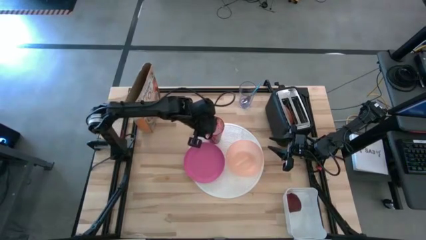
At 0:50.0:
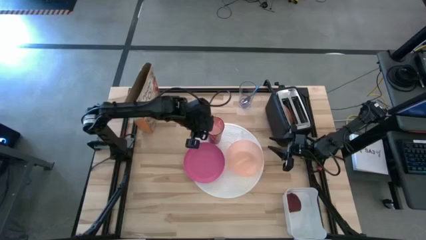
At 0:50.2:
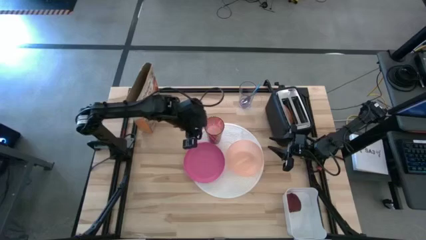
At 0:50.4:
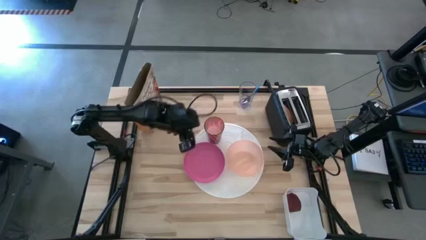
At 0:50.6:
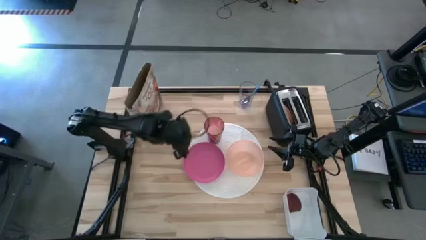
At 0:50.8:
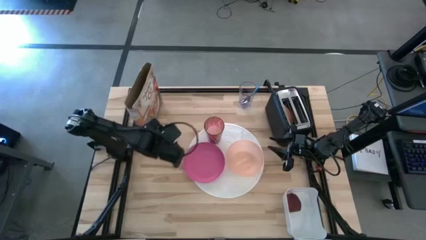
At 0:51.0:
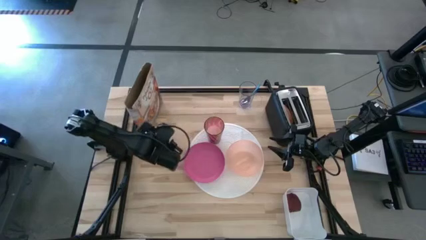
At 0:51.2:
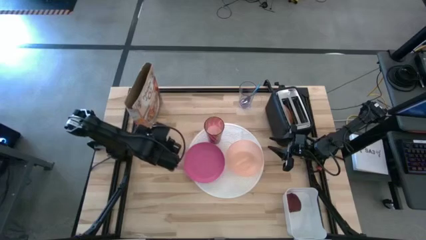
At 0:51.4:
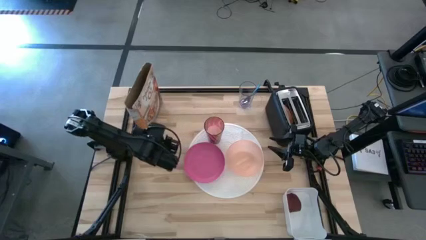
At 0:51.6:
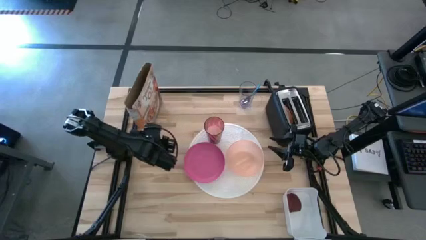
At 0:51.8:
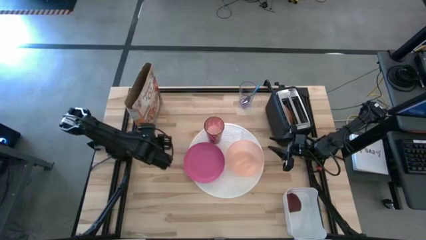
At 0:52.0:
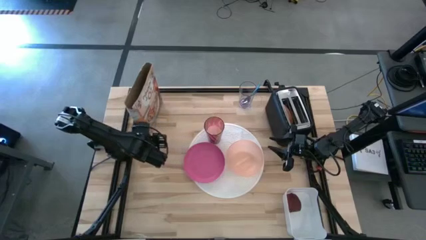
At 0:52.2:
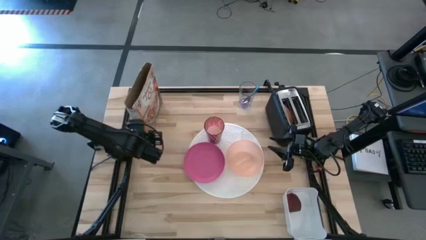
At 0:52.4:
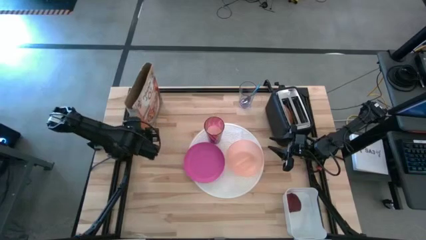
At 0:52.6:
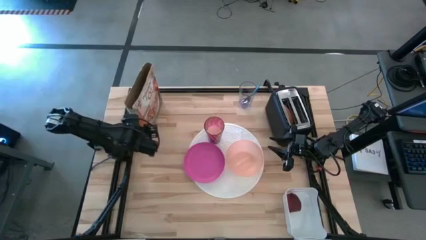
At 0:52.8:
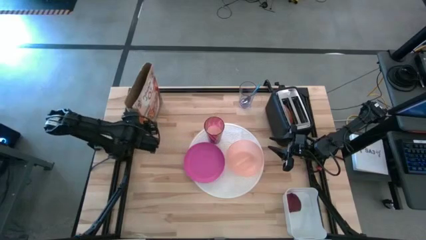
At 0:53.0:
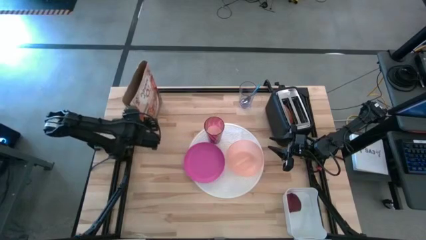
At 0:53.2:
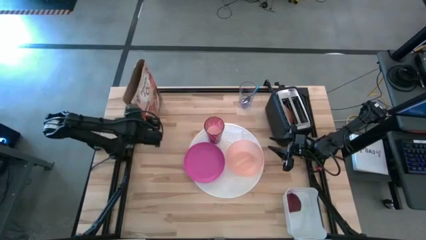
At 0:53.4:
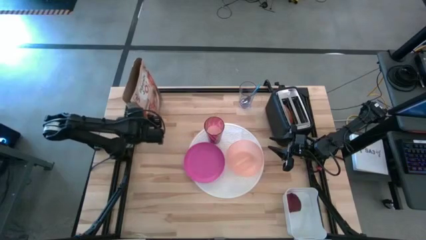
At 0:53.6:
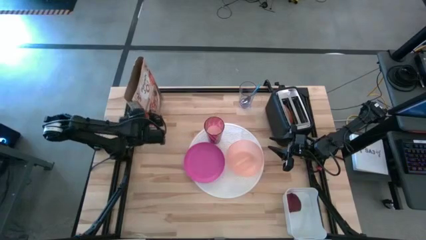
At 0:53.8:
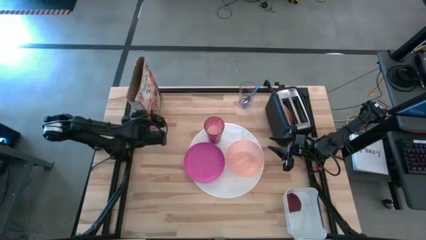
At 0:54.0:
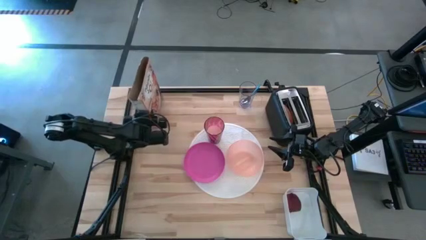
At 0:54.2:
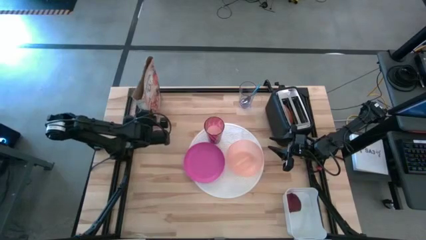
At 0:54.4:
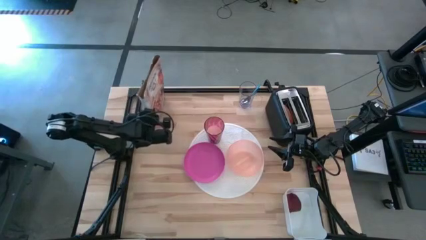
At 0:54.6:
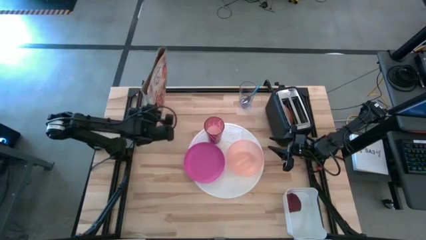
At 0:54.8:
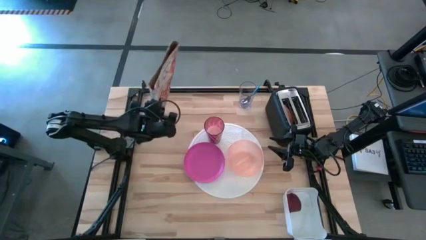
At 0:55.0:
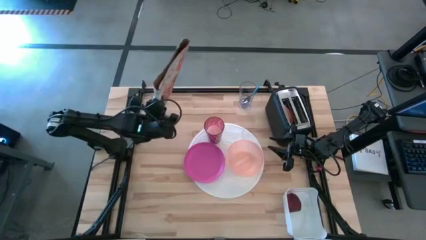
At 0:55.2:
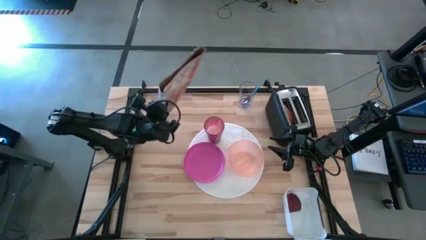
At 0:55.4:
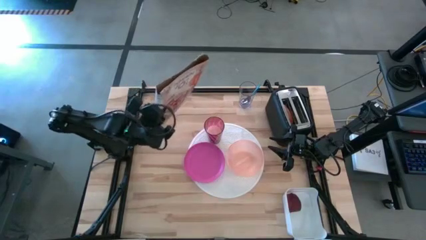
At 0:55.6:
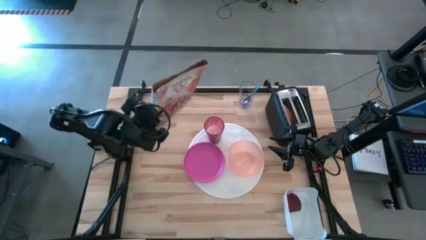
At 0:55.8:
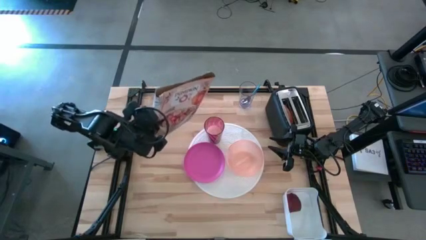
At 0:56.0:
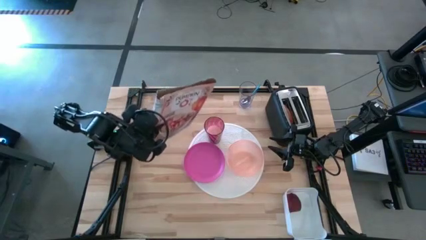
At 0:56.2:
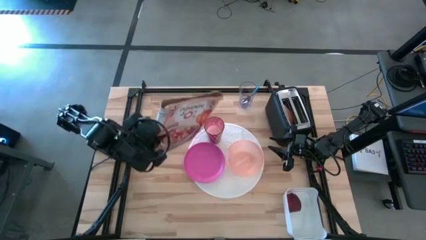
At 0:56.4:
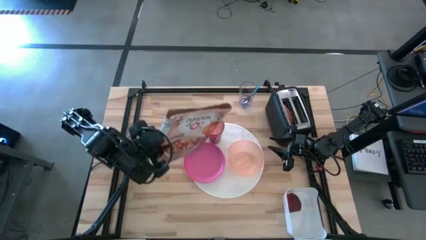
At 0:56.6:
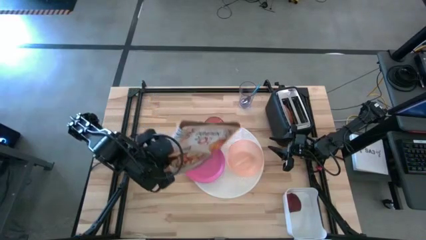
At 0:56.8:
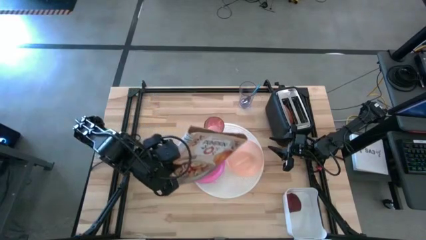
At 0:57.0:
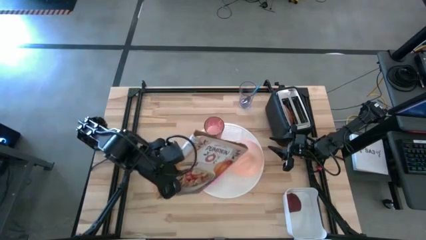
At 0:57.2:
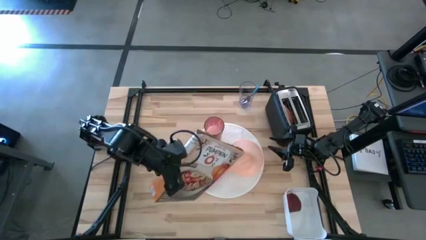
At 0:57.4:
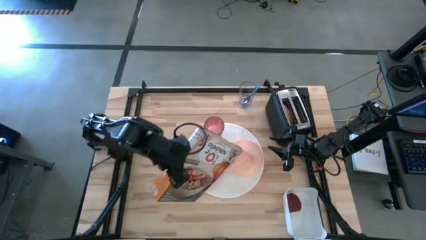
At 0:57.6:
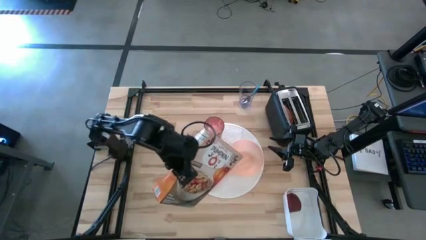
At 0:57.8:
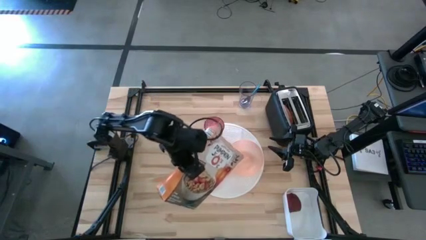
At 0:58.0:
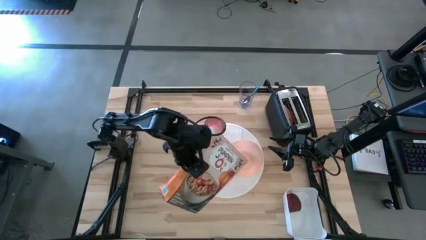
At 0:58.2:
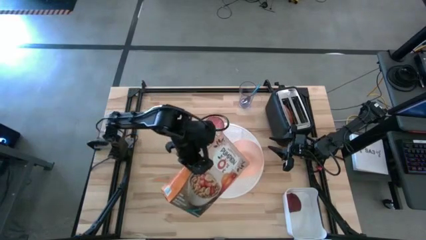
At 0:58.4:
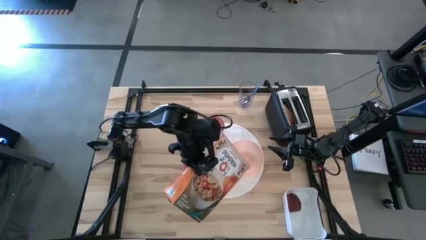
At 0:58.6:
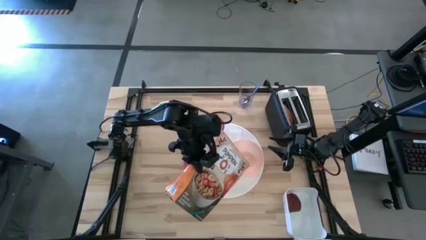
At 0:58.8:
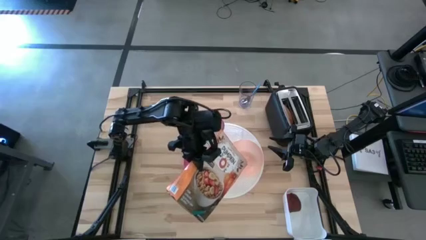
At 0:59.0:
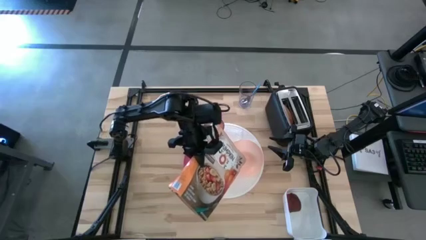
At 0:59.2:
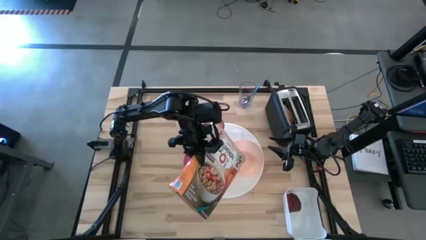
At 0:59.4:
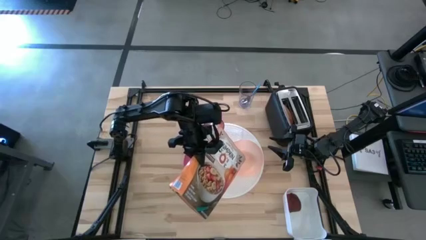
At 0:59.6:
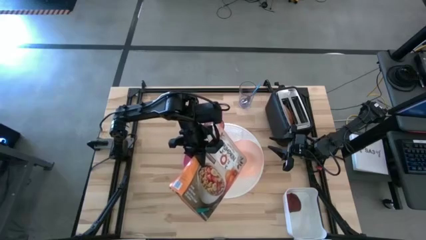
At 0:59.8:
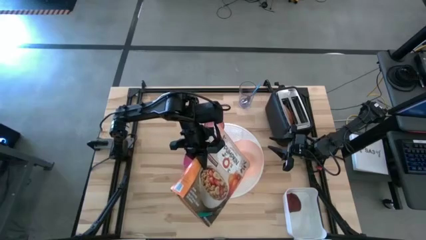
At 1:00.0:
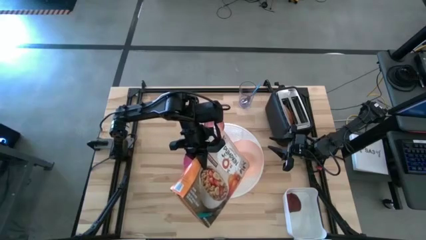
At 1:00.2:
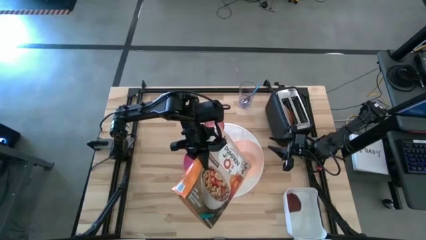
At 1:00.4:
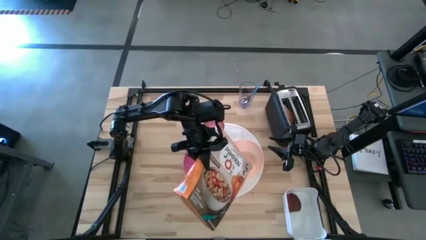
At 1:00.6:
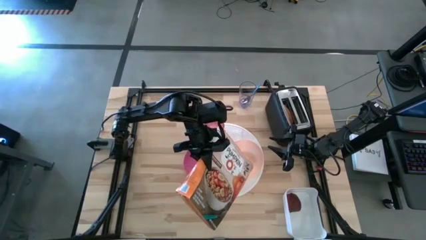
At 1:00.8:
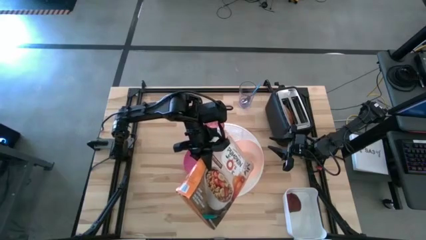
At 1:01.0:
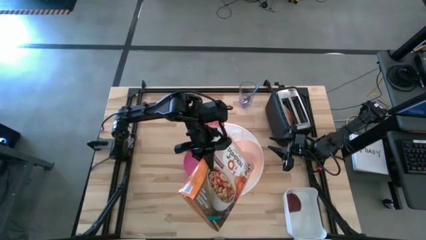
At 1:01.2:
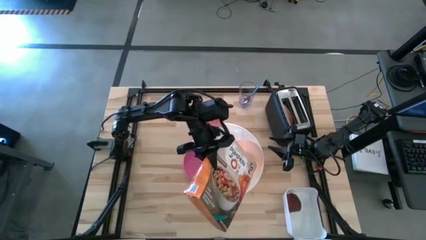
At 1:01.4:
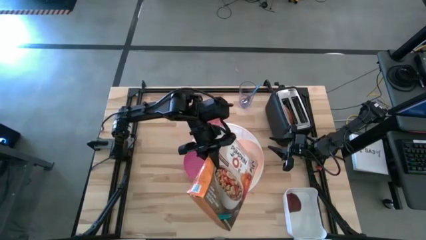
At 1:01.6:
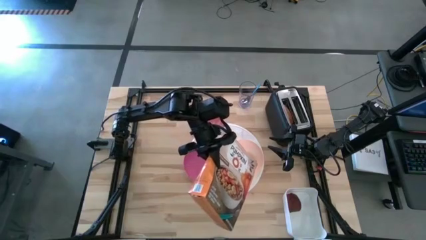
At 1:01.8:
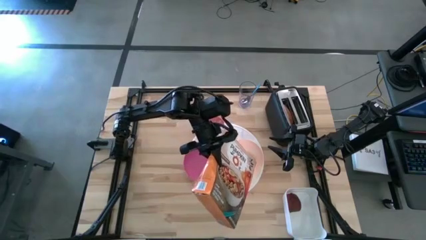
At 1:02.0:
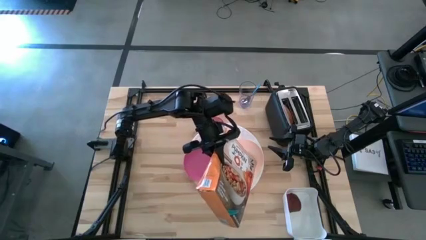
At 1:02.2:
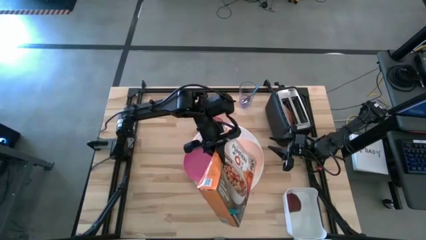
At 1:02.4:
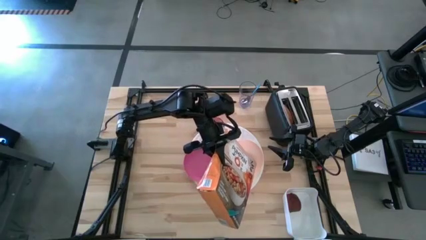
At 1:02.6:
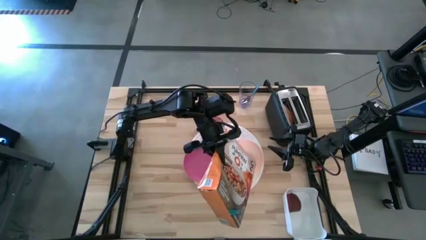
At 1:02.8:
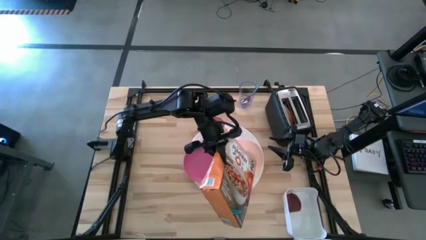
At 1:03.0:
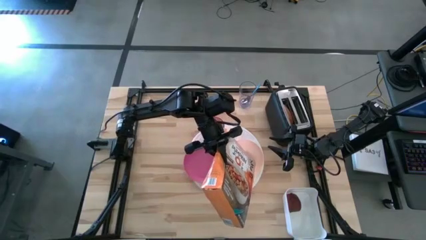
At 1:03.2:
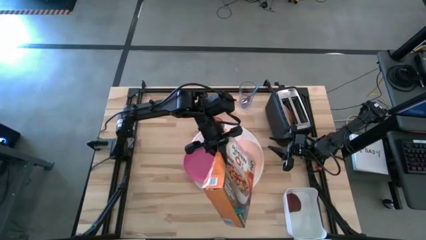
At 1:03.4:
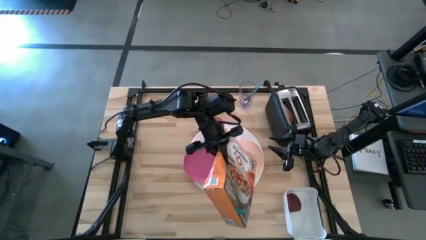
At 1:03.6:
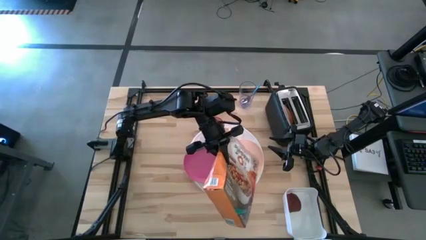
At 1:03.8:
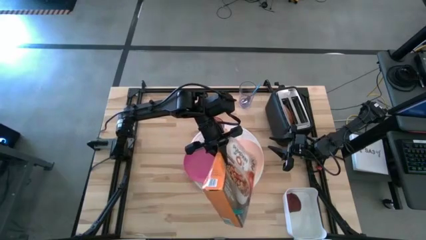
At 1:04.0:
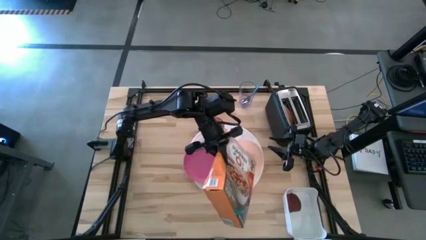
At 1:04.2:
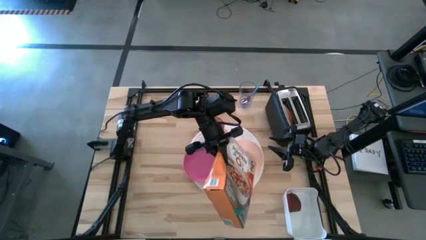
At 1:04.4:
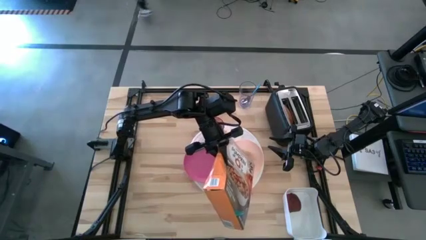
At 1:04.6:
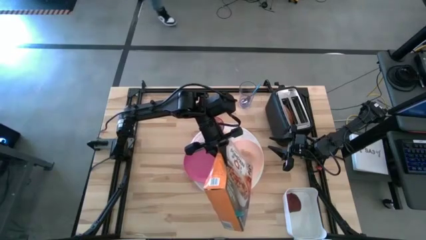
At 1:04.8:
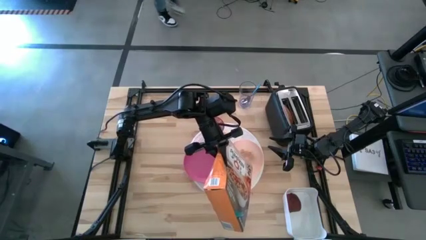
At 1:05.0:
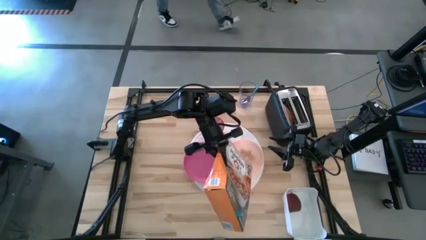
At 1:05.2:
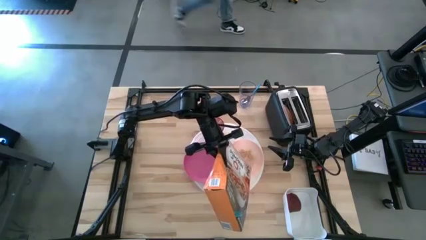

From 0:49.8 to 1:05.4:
Task: Arrange a breakfast setting
Pour the cereal into the light orange bowl
